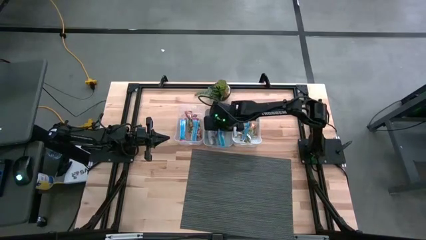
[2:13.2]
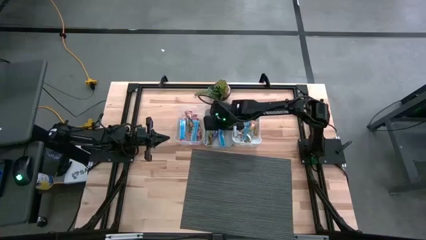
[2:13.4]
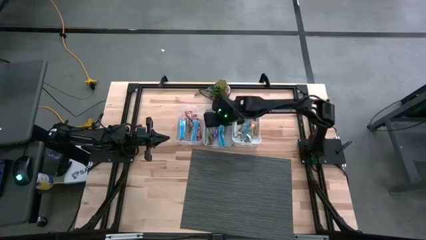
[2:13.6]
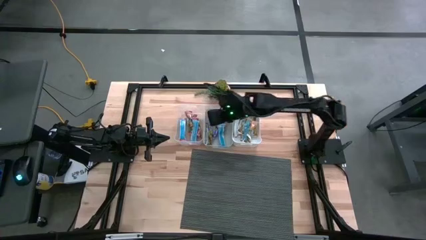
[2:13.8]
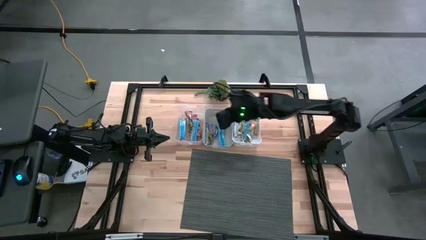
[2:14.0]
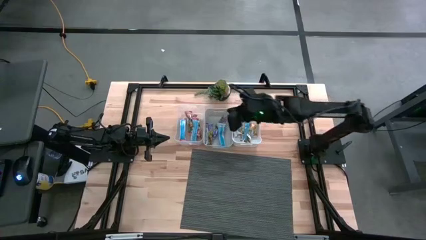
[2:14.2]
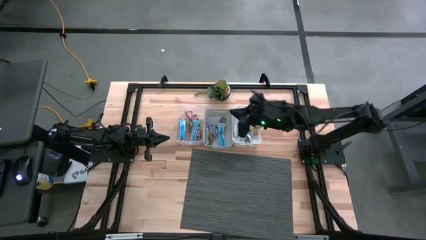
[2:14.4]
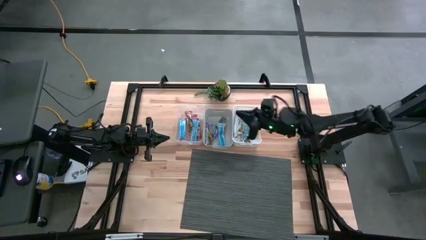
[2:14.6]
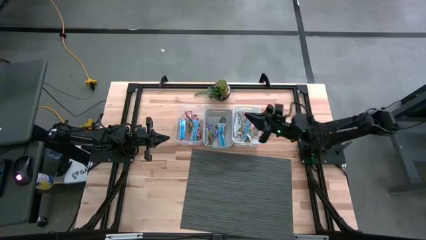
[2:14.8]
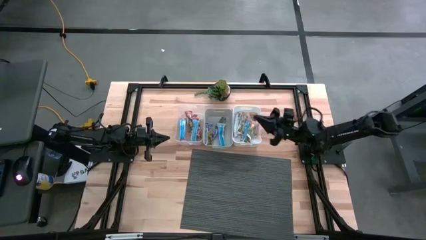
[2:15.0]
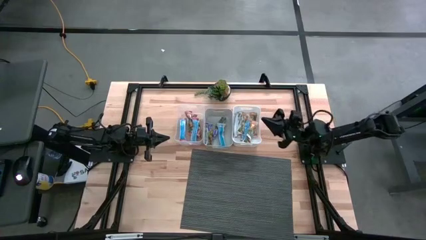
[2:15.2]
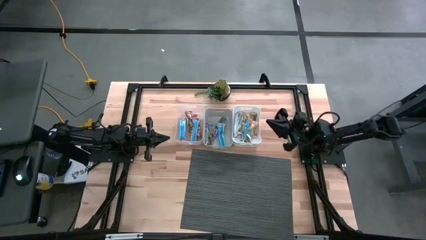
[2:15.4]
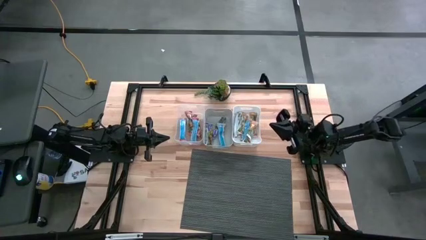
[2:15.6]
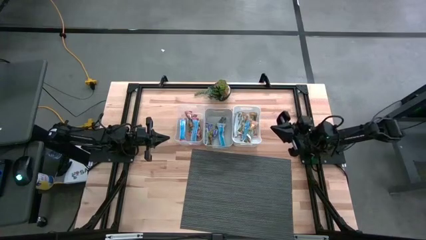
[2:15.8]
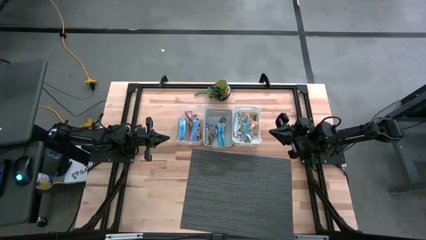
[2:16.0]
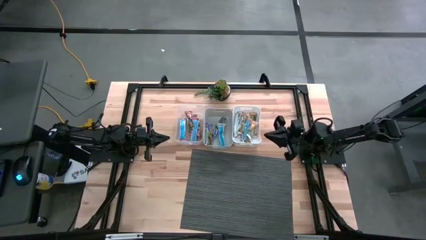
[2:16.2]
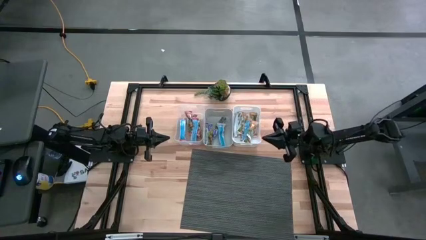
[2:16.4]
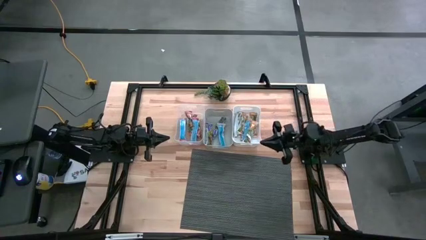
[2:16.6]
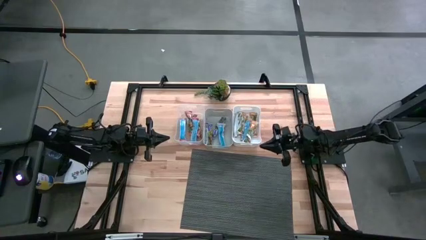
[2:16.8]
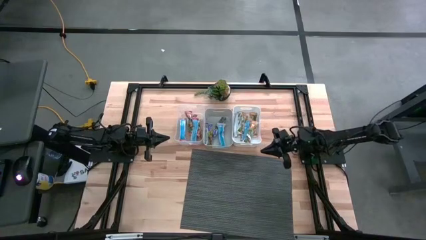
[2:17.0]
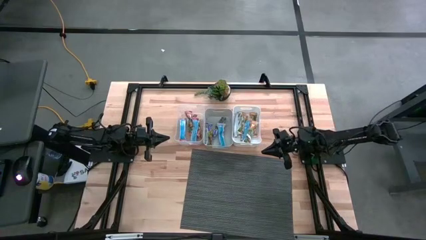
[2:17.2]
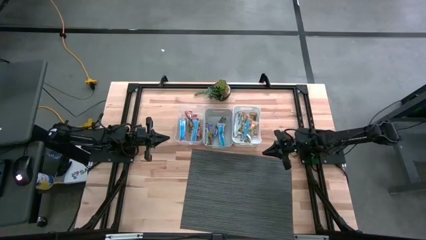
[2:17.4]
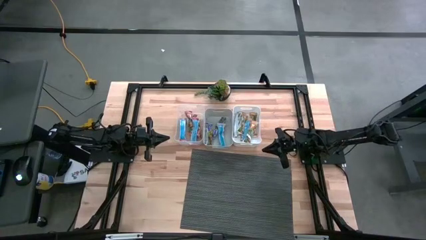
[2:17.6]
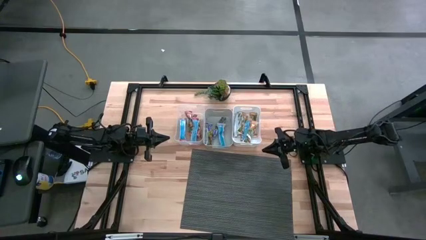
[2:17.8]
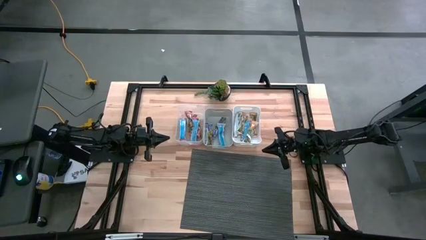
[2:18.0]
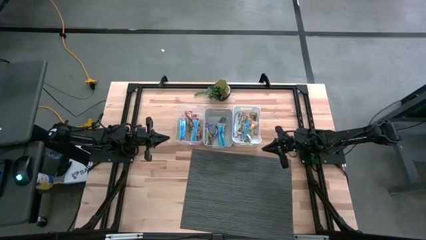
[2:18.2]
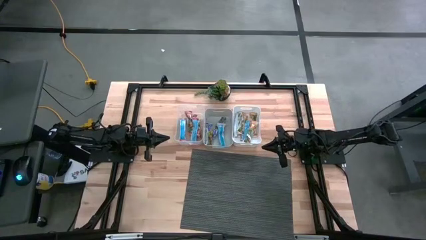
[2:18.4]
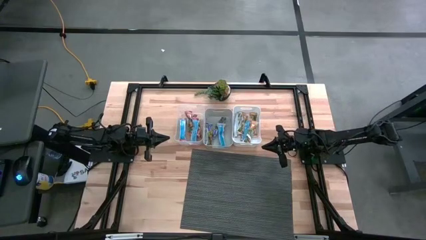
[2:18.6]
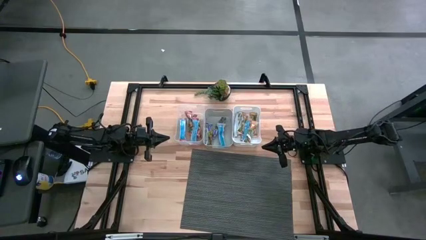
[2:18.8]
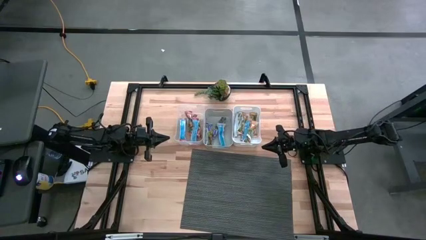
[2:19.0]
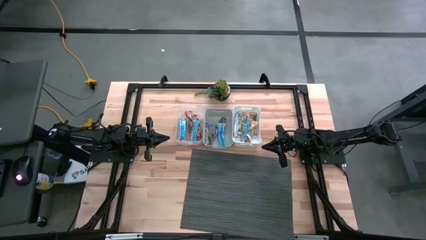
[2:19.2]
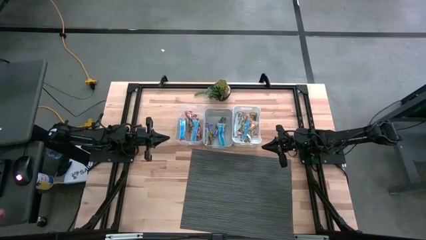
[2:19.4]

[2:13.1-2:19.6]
Task: Pick and place Granola Bars by type
Return to Home Position

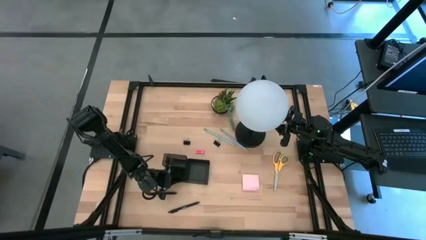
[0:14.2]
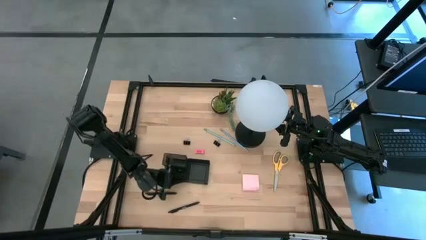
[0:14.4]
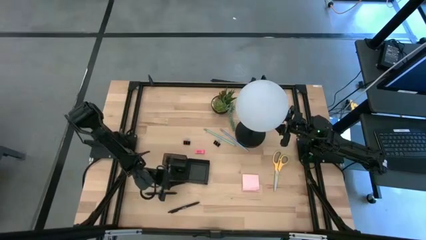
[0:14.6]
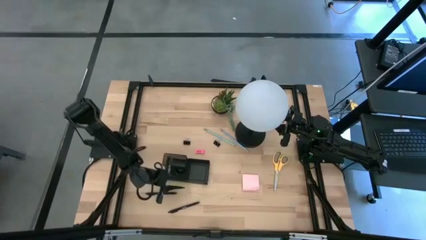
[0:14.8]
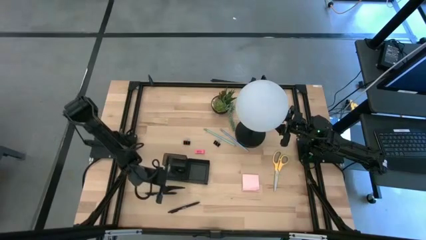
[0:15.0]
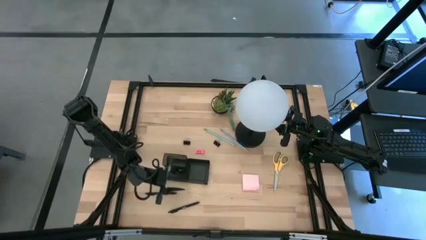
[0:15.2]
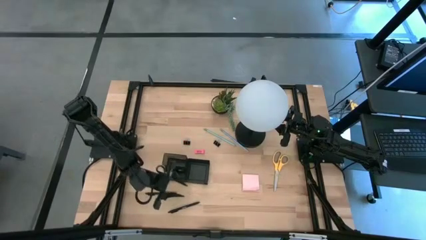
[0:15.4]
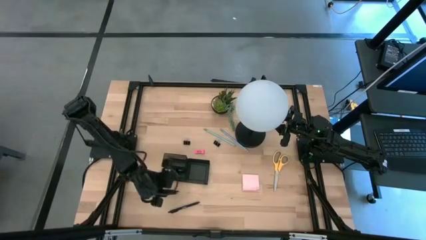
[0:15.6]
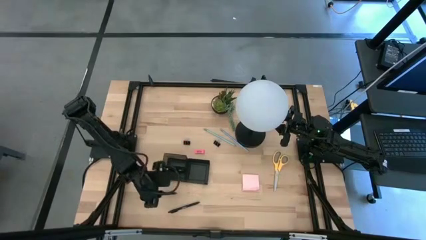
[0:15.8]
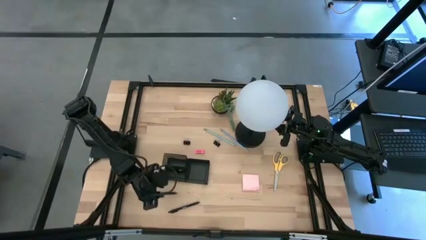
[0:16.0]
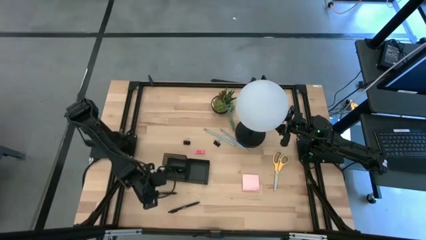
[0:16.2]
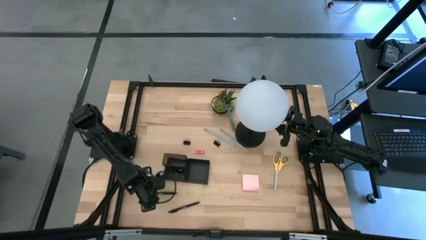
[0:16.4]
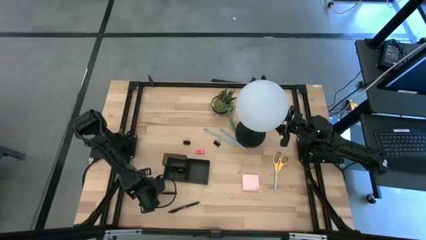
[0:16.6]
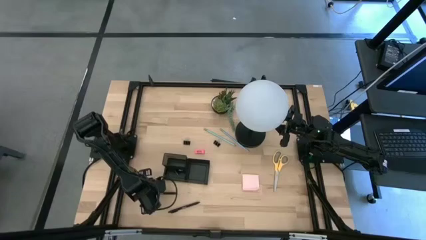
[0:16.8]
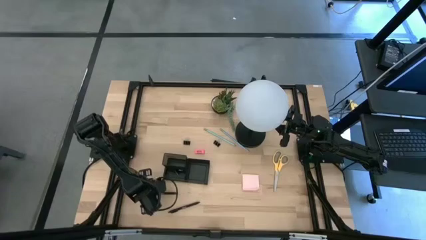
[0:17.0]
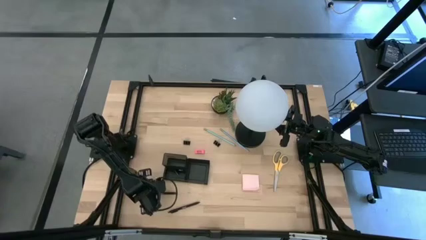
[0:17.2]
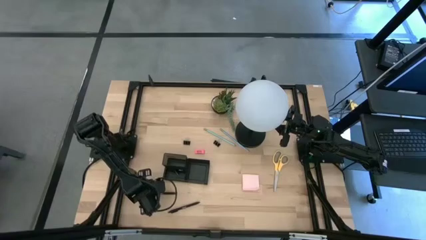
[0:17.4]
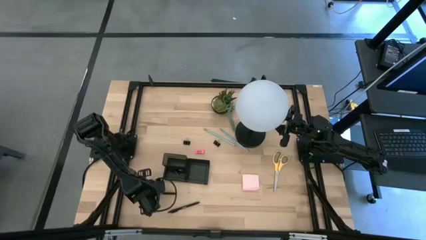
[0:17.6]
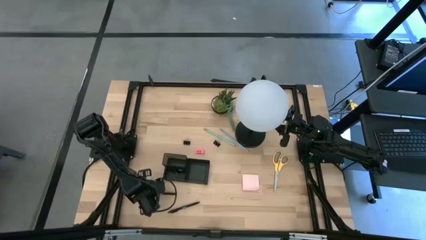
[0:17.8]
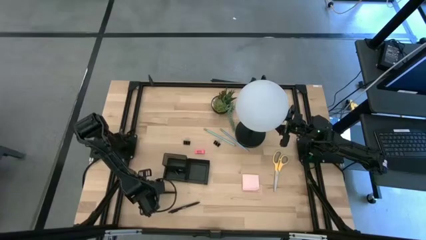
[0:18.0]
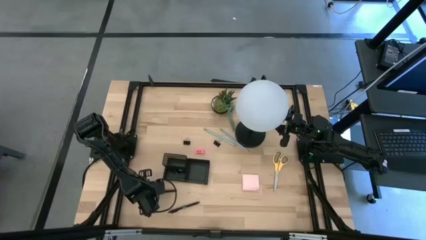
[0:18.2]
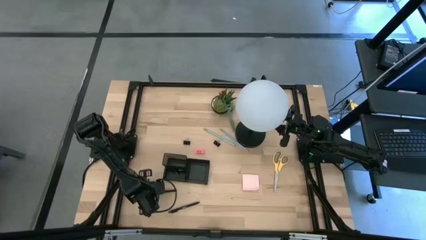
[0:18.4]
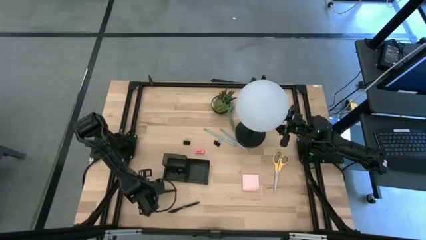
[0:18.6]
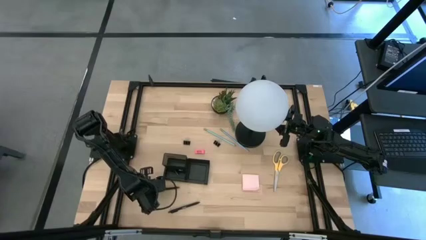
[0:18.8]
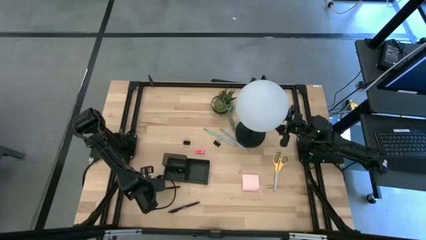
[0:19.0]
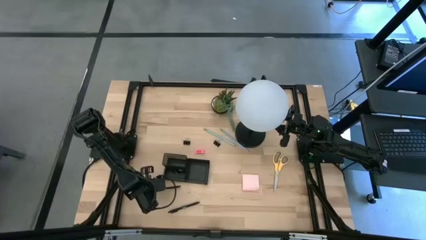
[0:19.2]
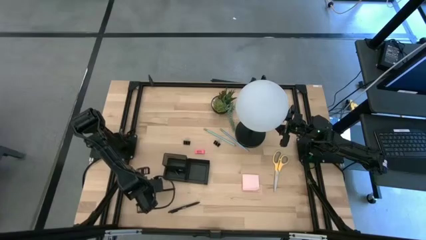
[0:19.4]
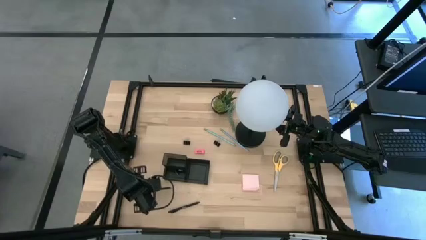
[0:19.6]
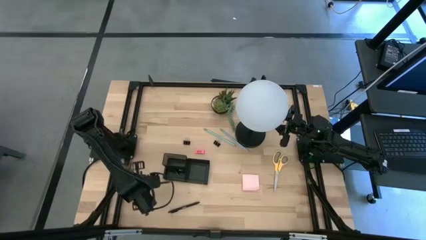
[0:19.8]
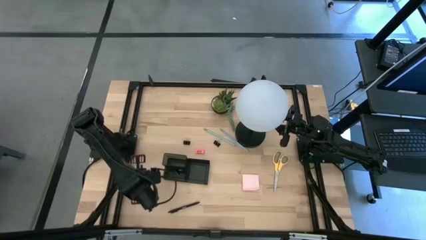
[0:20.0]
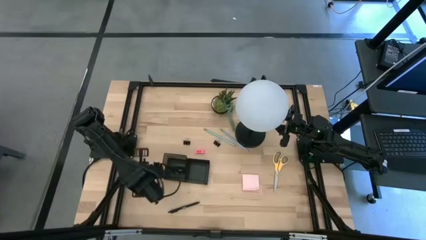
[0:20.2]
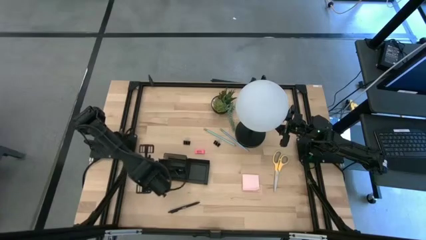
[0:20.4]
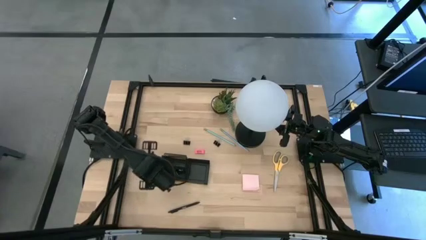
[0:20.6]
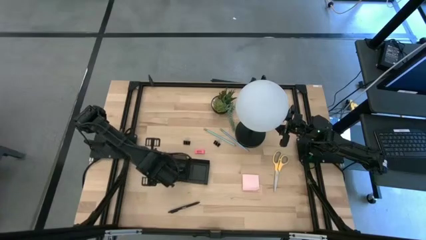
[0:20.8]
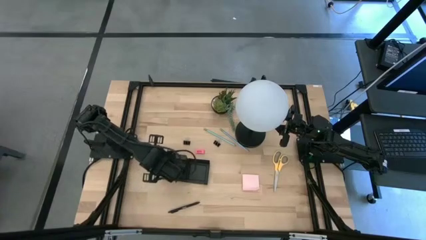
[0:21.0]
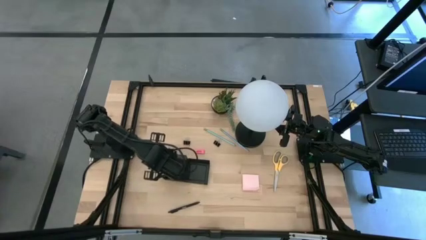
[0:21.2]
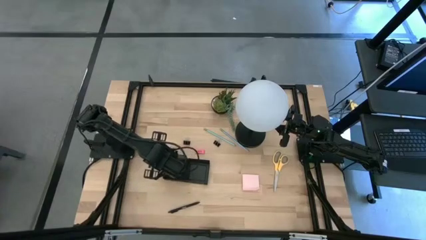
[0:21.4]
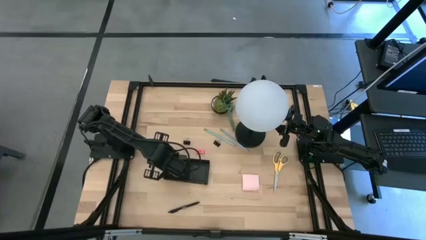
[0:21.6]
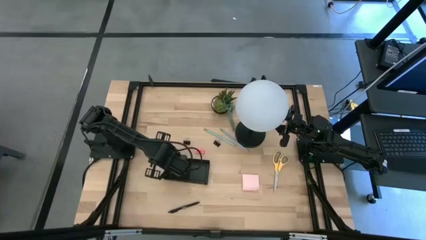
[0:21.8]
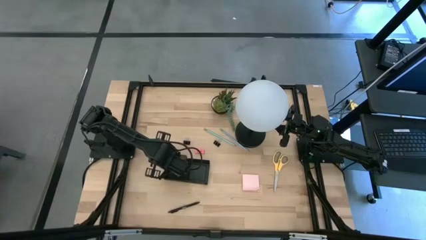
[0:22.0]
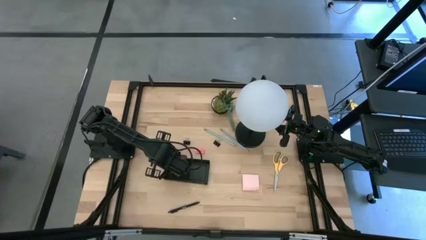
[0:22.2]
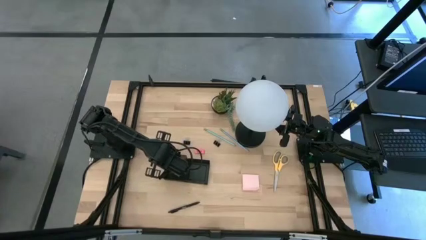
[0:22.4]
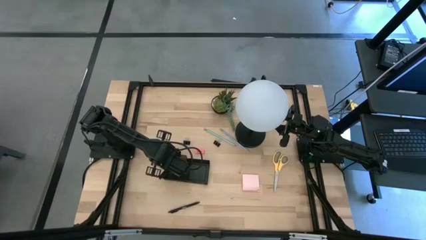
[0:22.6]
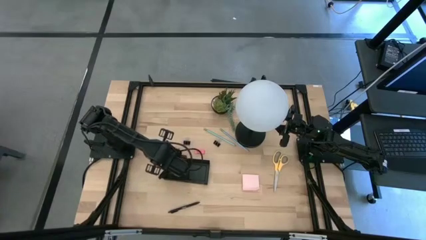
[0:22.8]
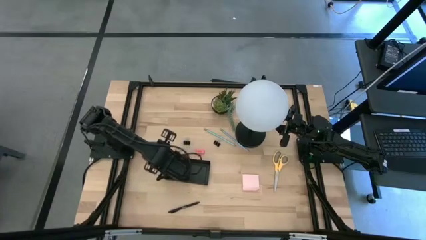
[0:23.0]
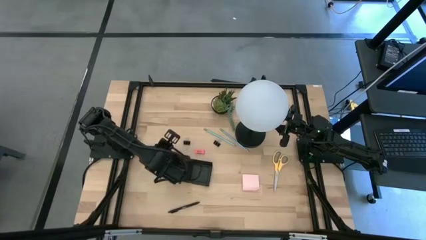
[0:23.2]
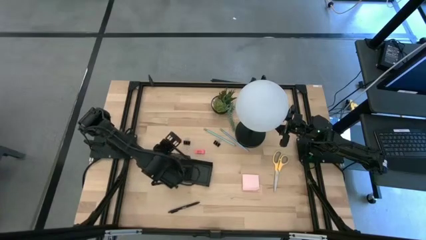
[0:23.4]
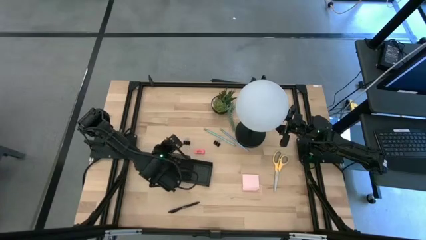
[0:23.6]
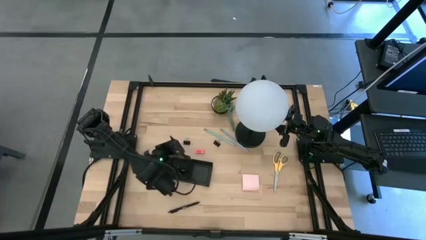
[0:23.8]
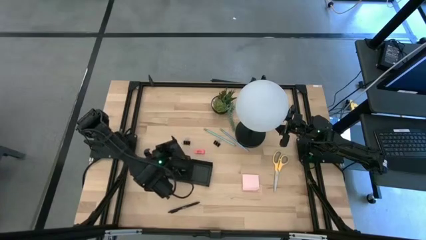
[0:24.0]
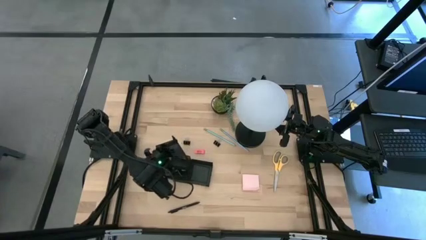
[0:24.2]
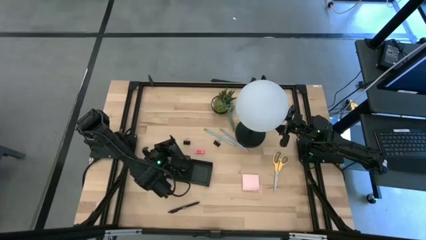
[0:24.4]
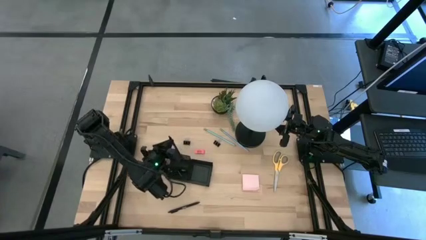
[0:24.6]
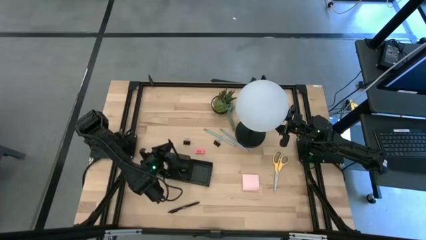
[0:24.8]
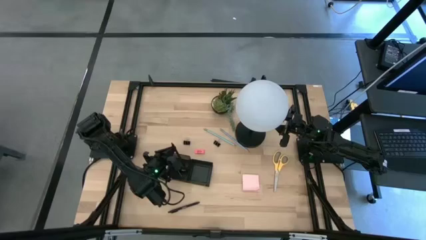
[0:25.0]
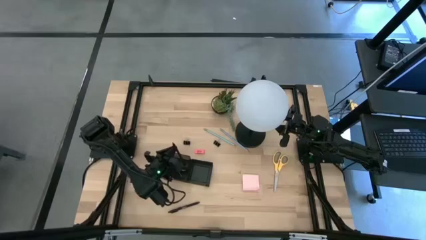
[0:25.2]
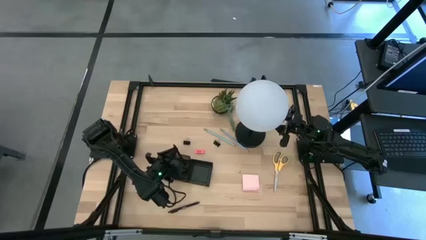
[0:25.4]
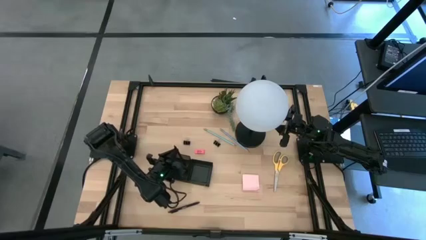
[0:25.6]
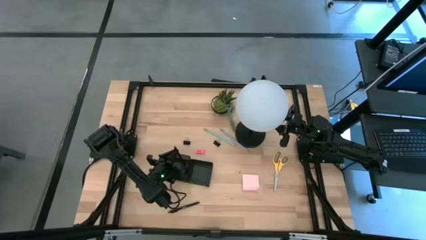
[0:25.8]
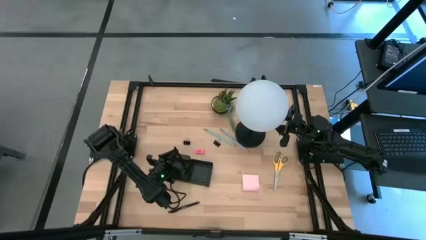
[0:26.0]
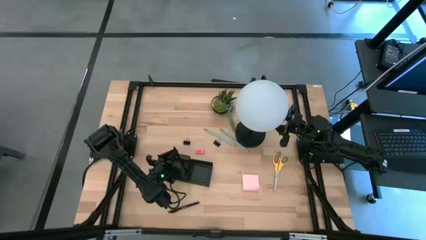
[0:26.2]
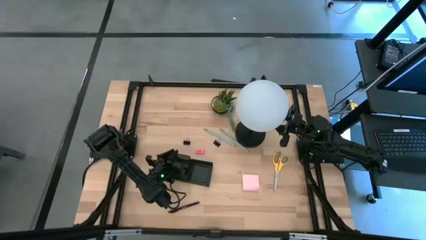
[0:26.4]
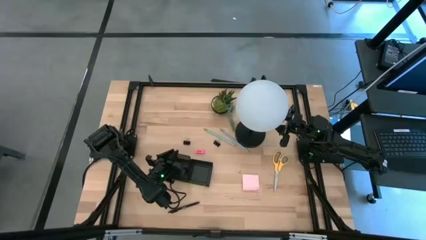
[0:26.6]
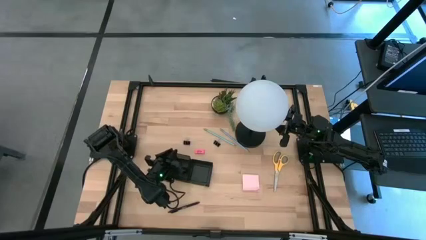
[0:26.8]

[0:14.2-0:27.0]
Task: Pick and place office supplies into organizer
Put the top black pen into the desk organizer
